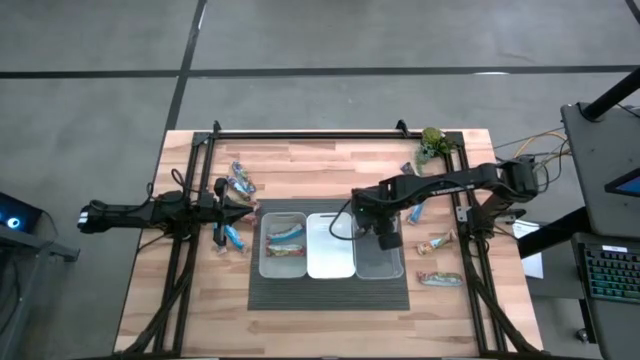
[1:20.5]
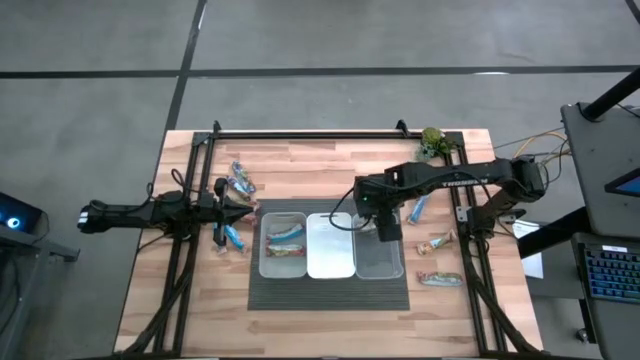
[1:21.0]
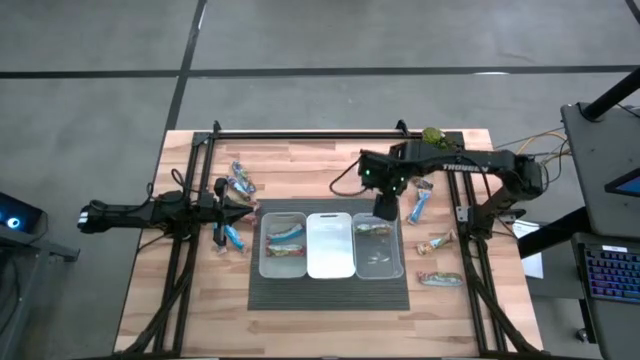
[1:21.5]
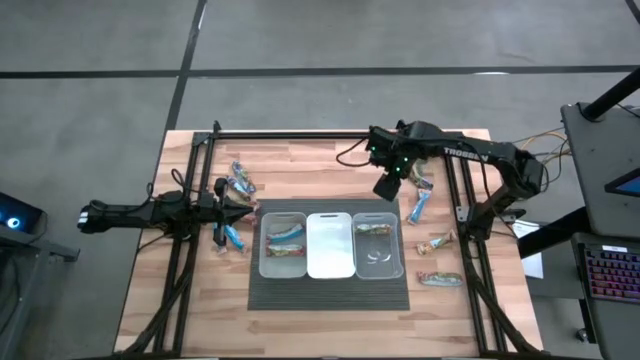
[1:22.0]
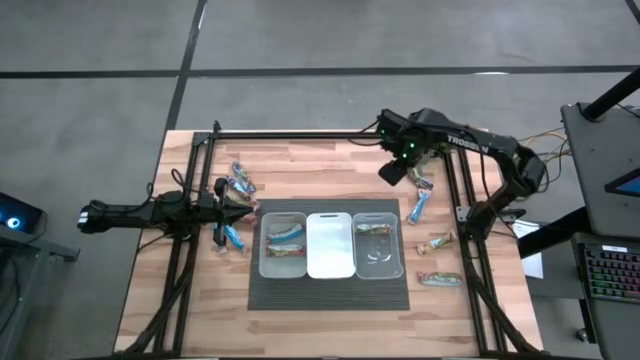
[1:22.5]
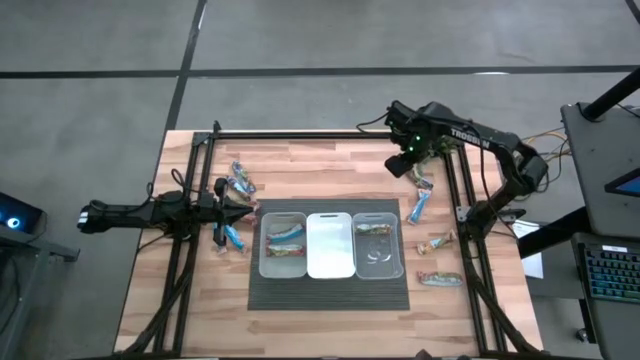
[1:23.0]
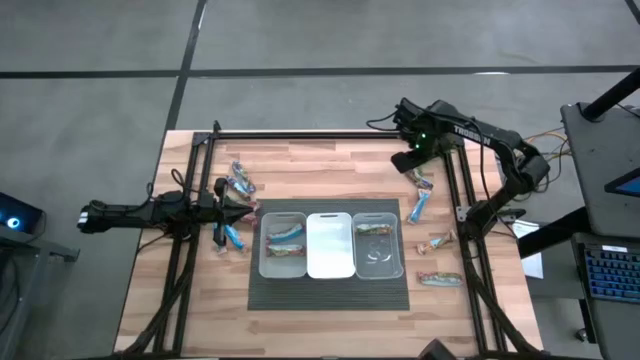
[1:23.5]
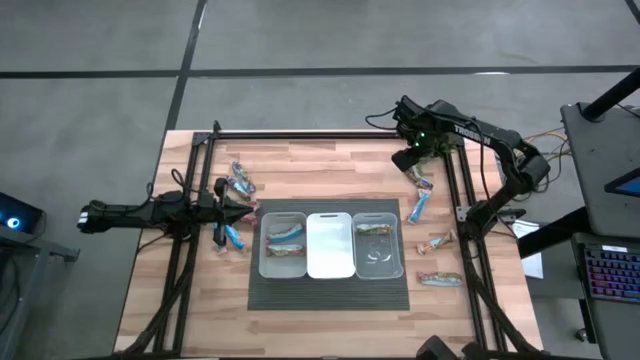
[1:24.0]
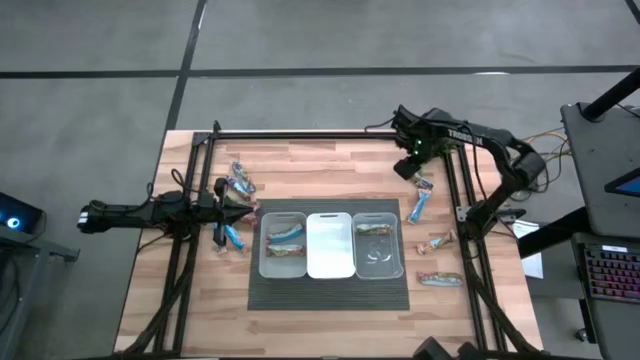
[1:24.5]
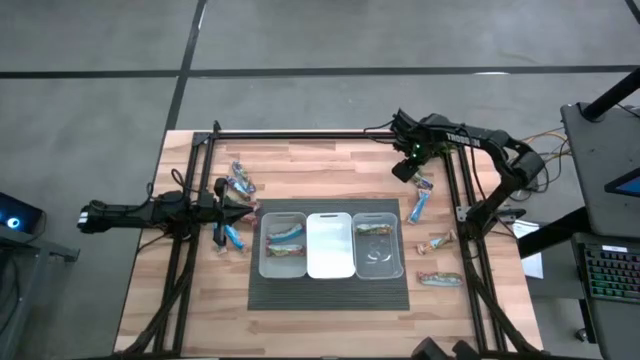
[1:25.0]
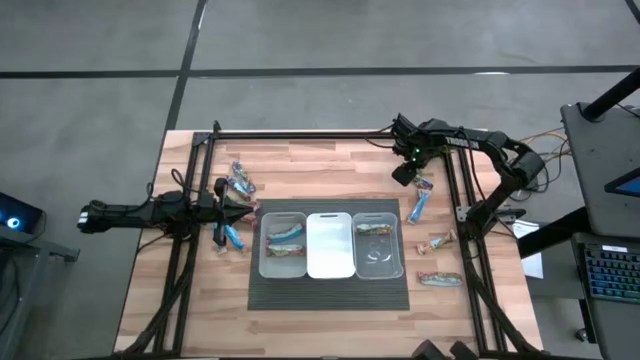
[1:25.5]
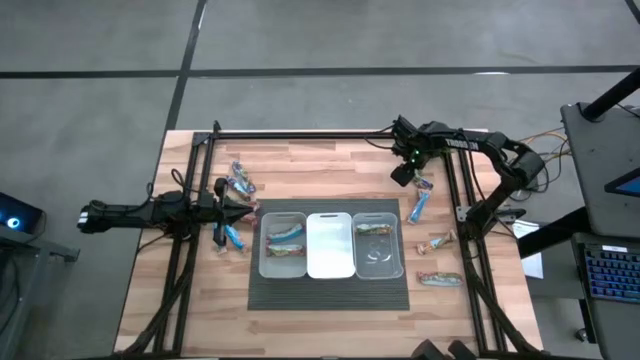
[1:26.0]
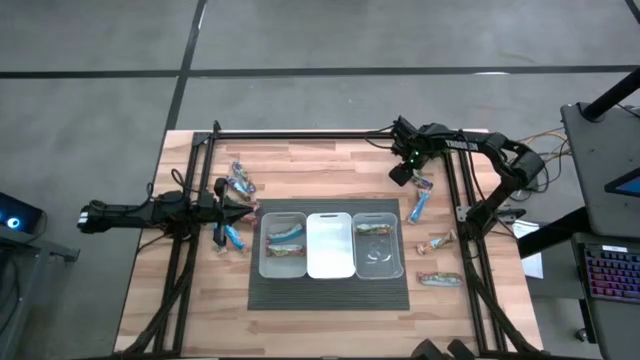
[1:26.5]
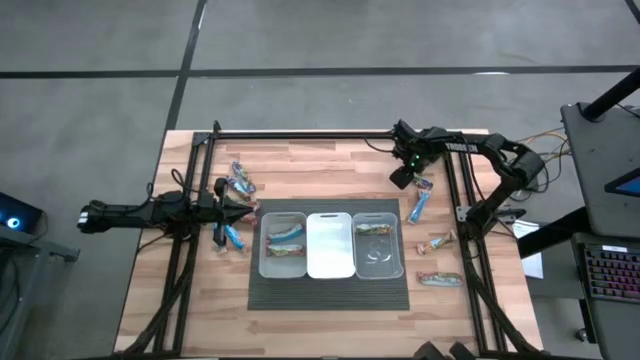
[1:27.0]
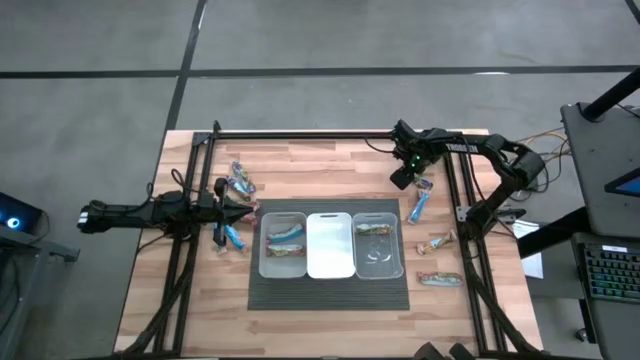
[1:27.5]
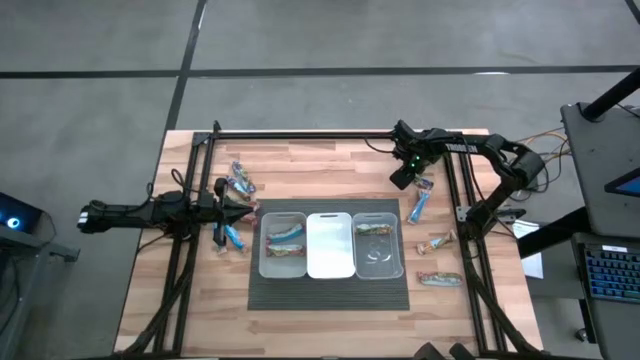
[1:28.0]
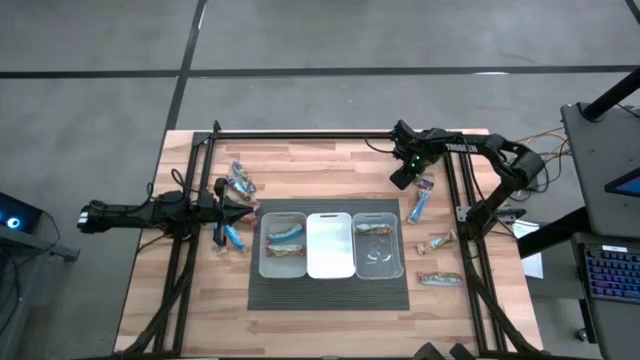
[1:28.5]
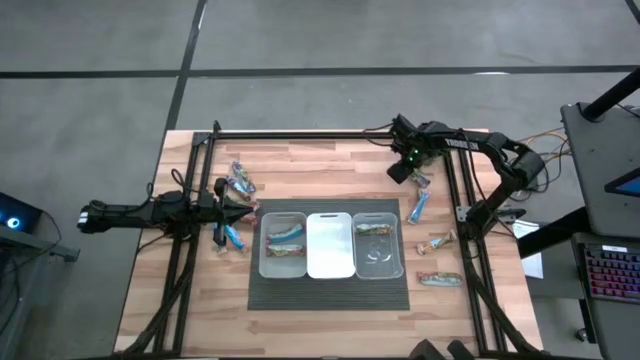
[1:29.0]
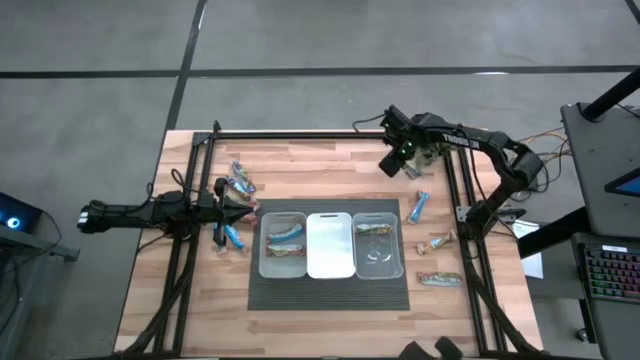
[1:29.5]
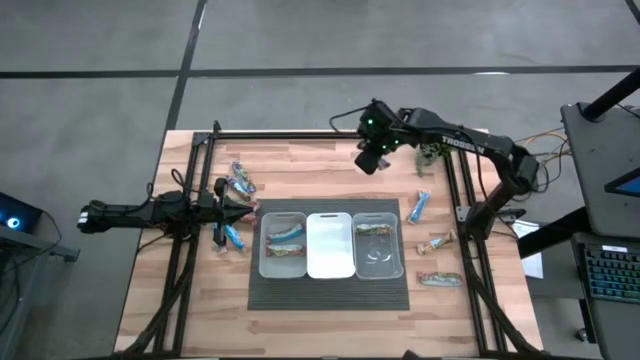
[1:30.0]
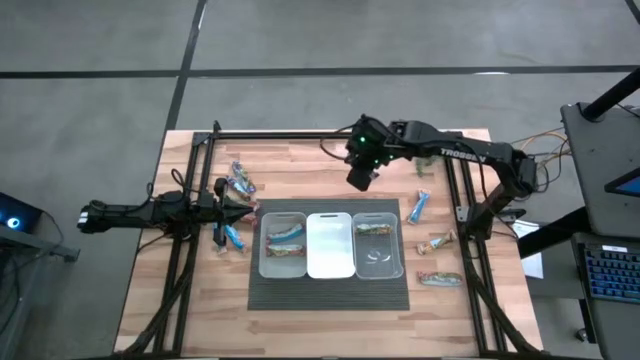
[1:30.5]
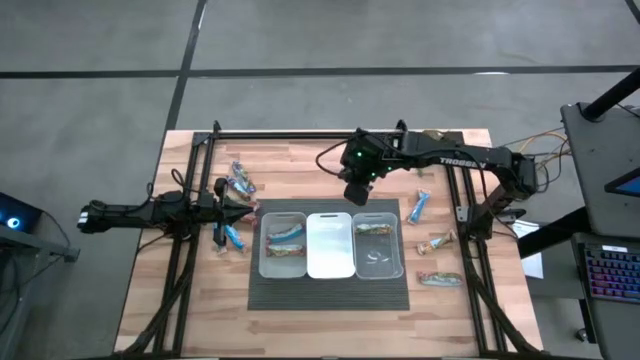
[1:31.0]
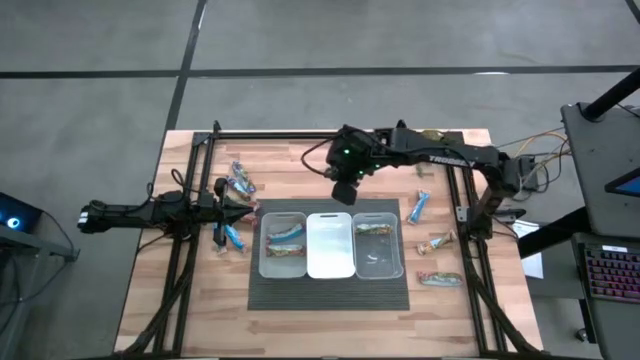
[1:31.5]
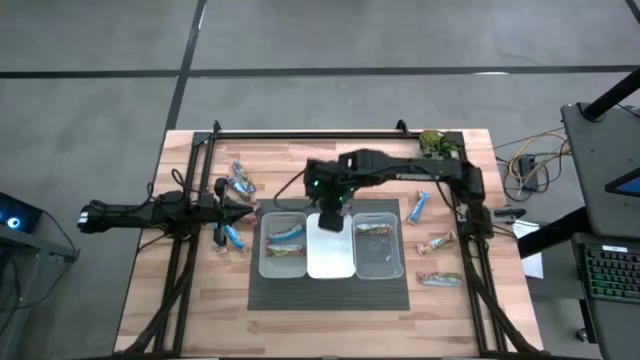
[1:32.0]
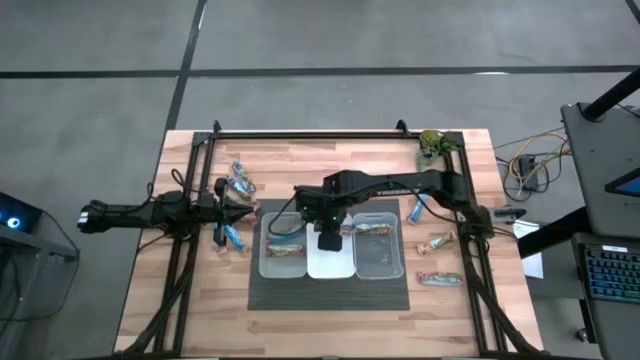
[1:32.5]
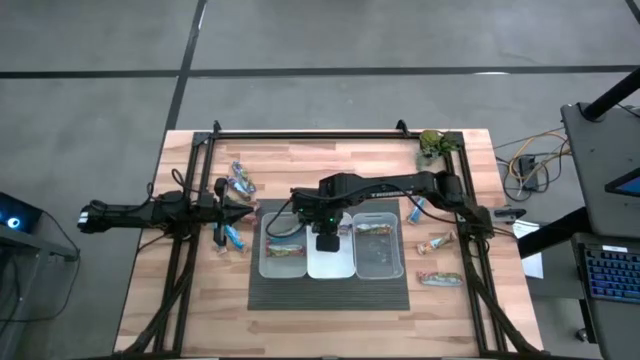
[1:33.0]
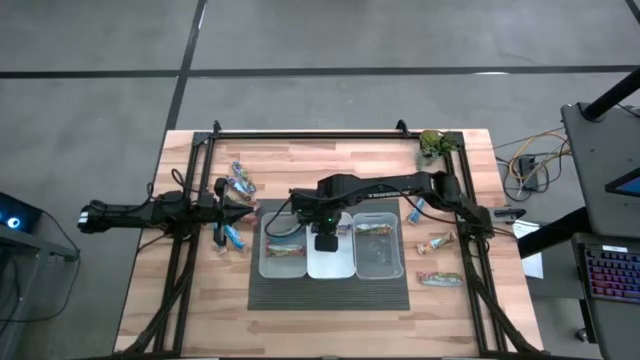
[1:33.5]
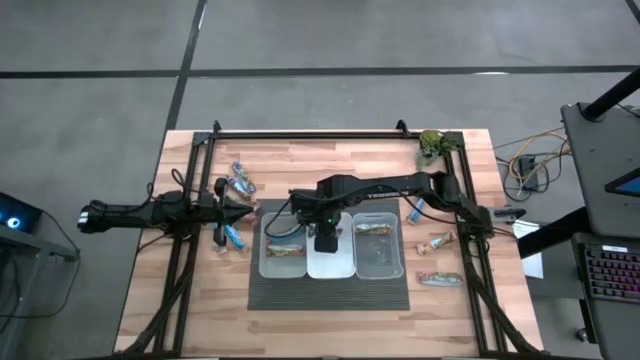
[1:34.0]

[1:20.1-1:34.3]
Task: Pick and place Granola Bars by type
Put the right blue granola bar into the white bin

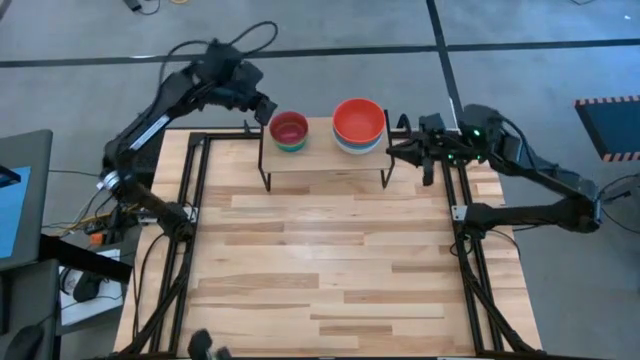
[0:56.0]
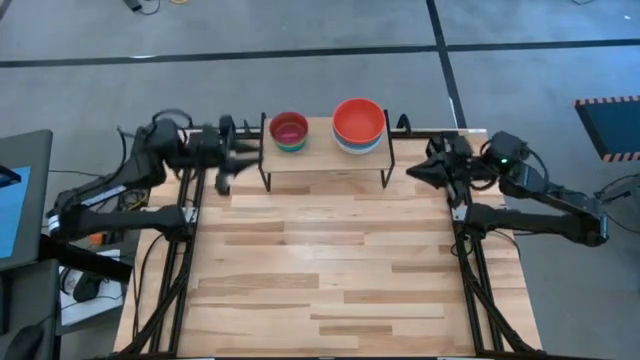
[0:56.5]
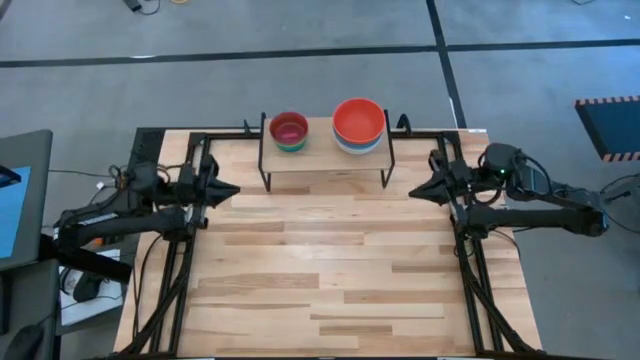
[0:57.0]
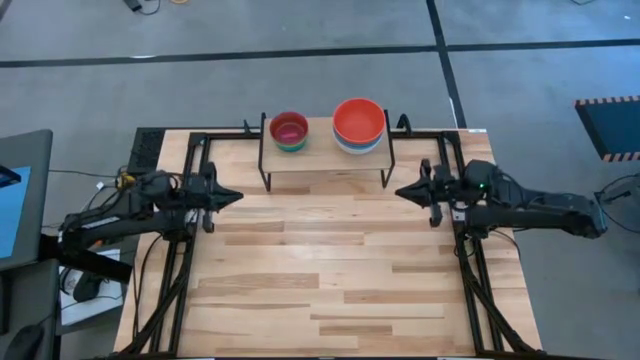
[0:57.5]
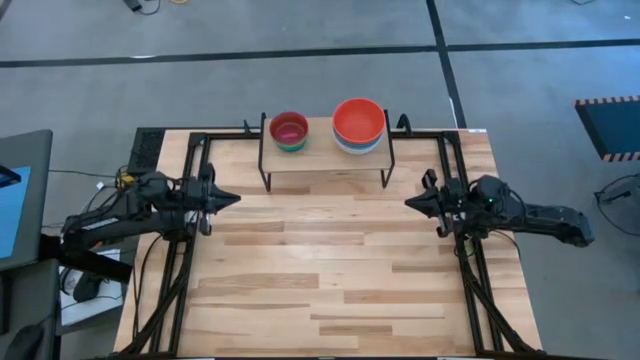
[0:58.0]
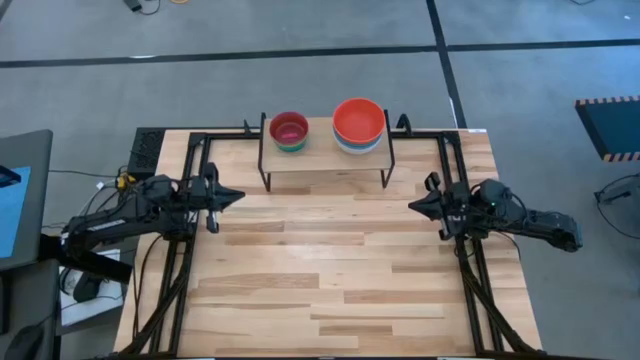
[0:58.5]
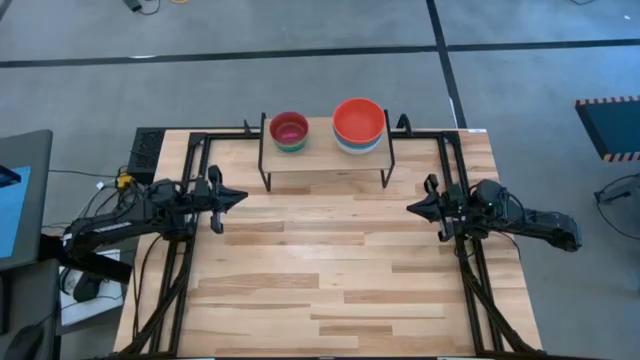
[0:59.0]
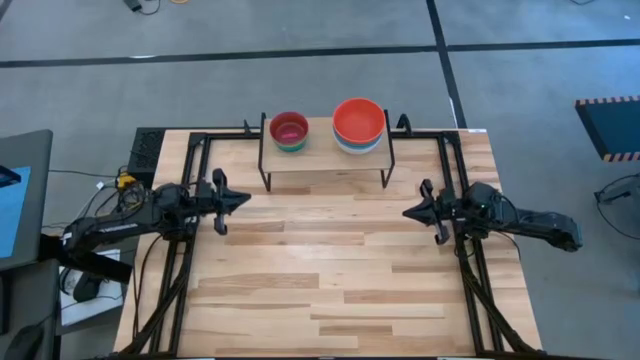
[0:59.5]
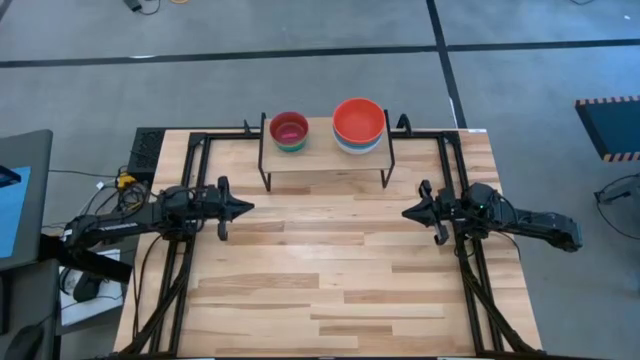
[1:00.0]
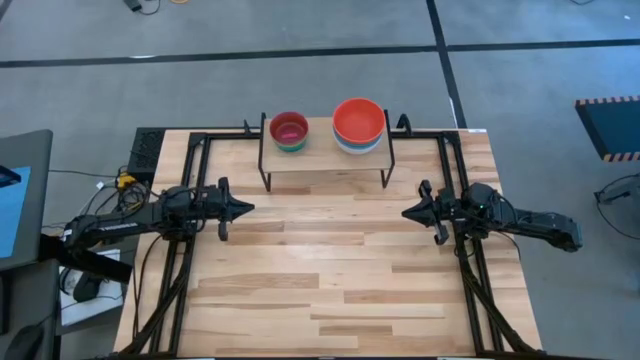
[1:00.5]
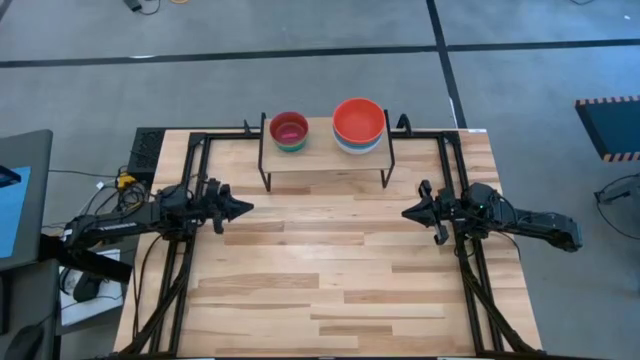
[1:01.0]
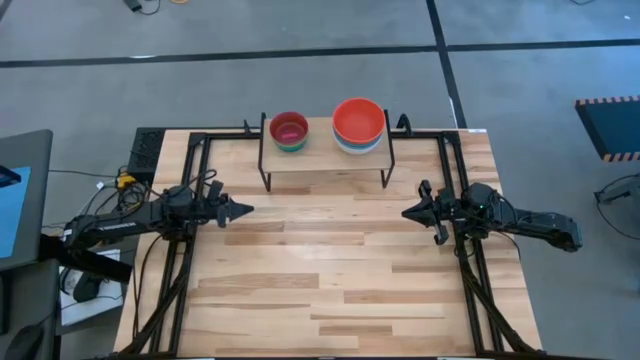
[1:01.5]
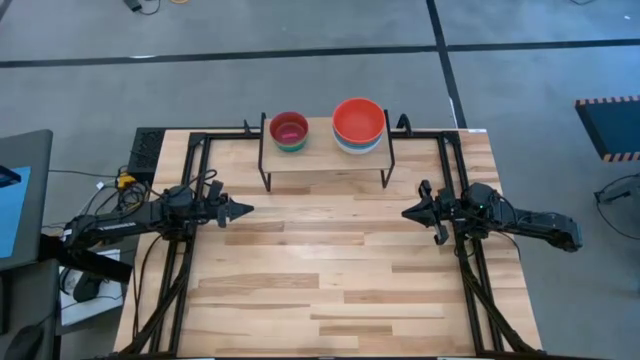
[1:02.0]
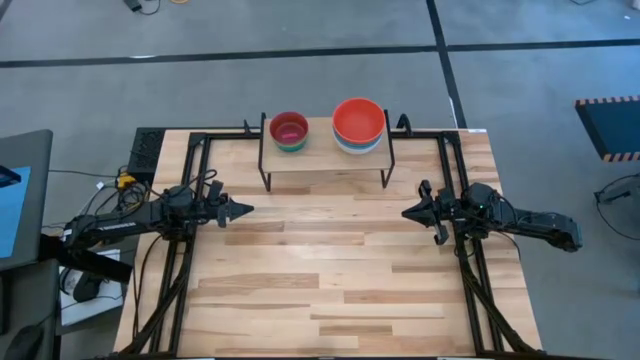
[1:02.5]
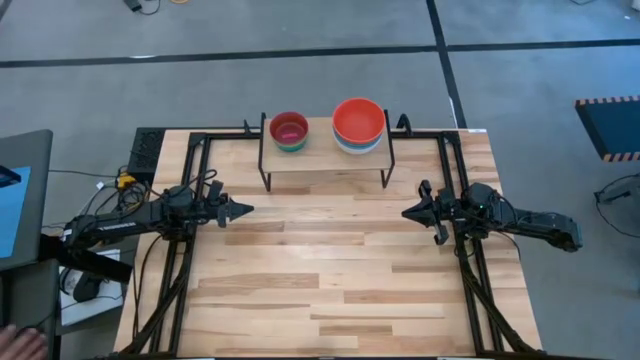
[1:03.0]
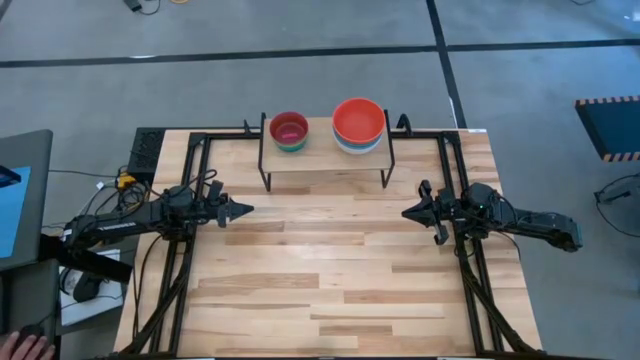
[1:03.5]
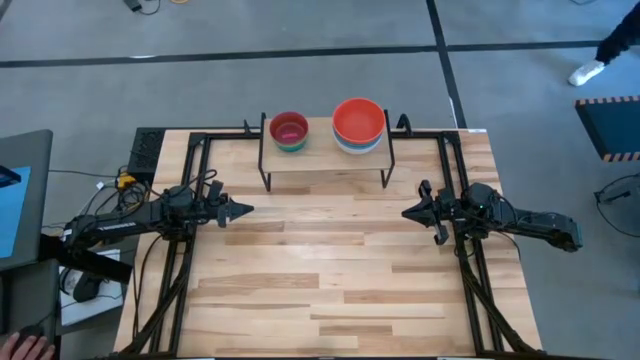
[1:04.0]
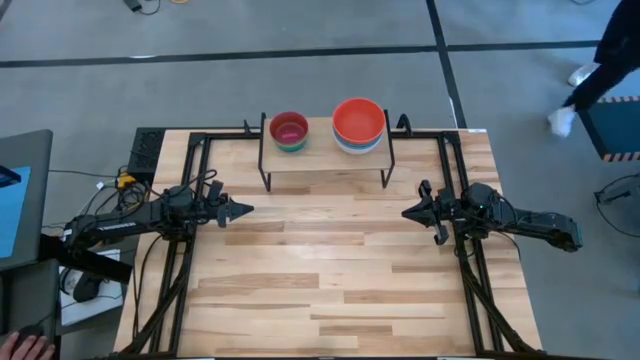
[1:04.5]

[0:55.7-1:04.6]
Task: Place and stack bowls onto a shelf
Return to Home Position
